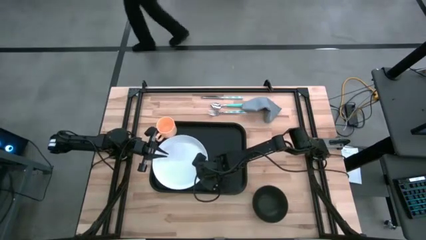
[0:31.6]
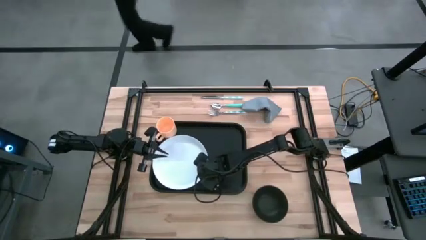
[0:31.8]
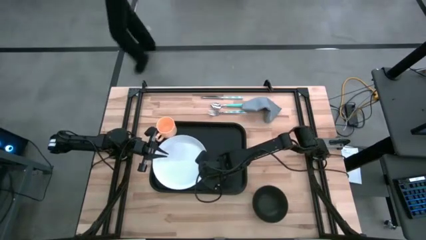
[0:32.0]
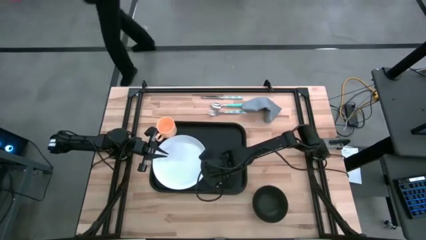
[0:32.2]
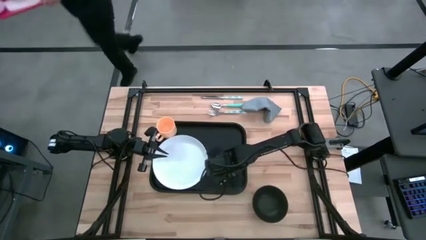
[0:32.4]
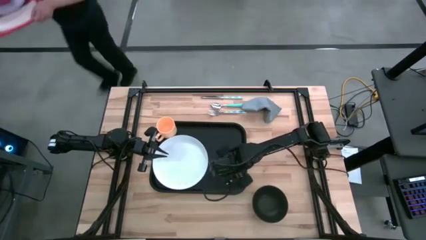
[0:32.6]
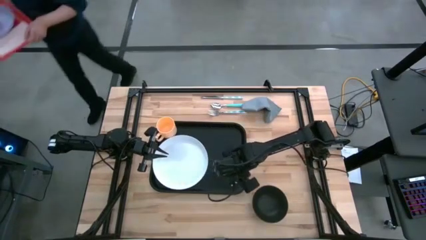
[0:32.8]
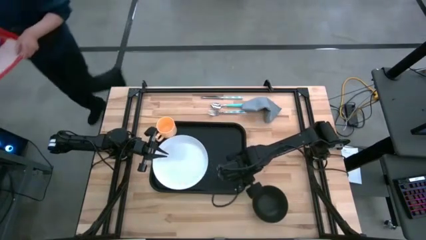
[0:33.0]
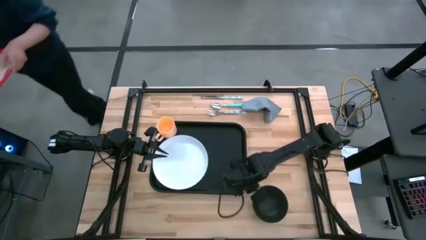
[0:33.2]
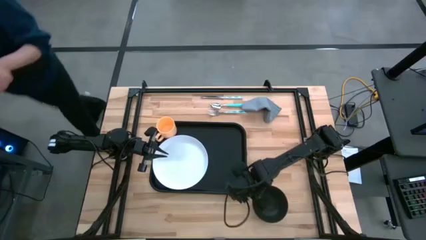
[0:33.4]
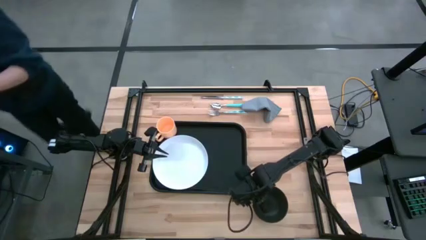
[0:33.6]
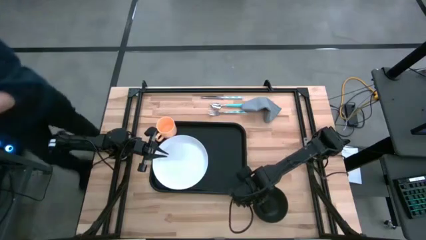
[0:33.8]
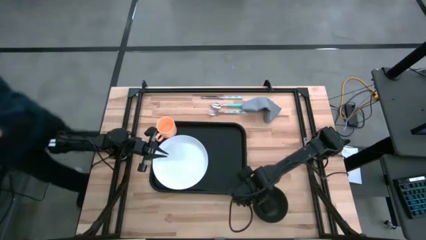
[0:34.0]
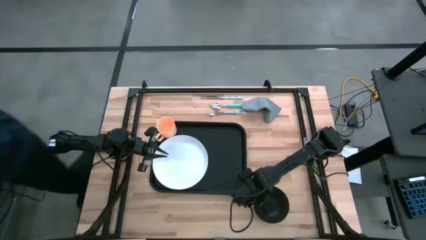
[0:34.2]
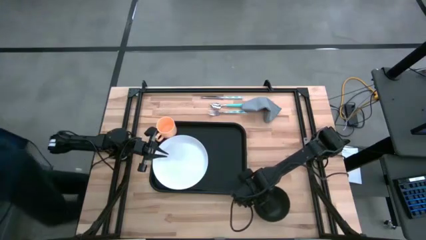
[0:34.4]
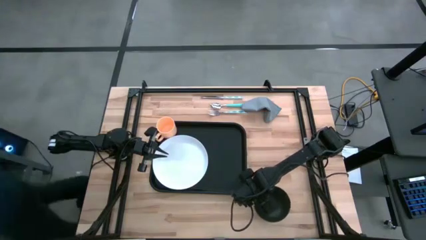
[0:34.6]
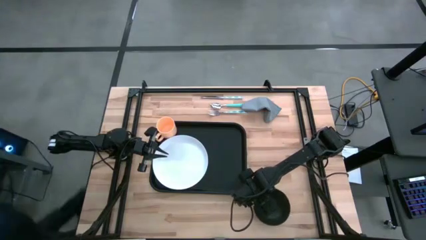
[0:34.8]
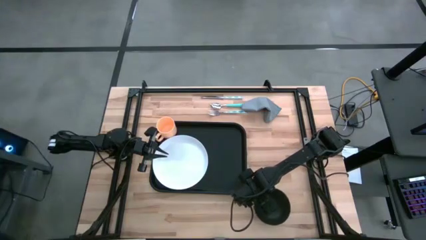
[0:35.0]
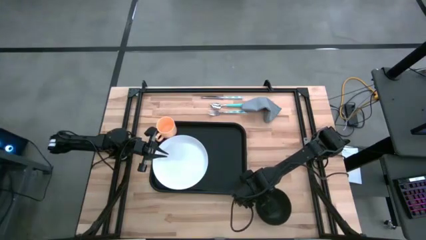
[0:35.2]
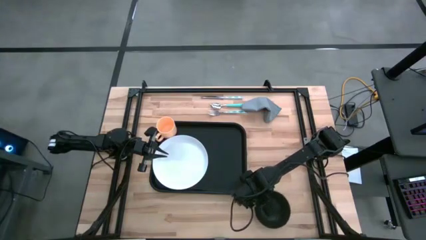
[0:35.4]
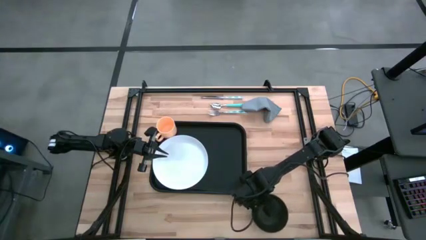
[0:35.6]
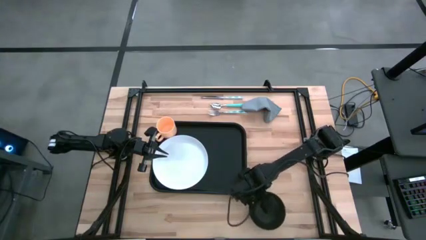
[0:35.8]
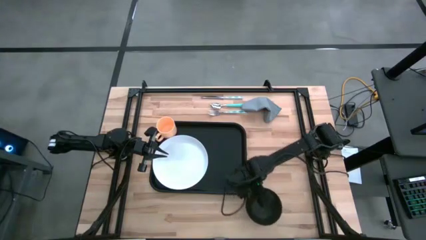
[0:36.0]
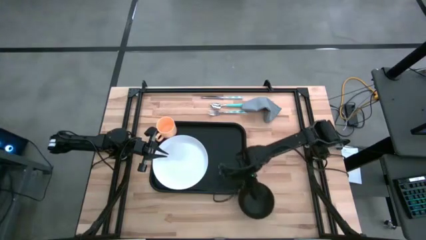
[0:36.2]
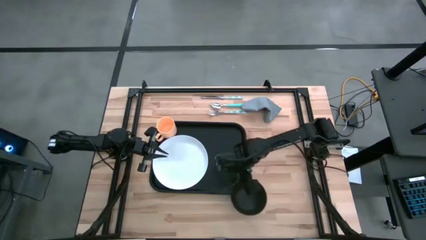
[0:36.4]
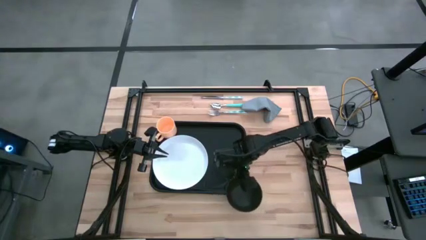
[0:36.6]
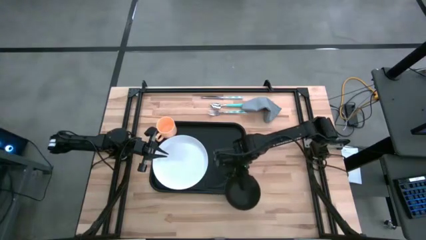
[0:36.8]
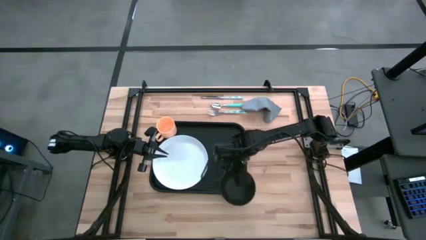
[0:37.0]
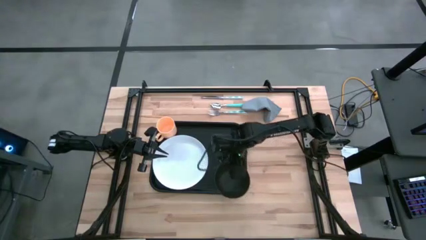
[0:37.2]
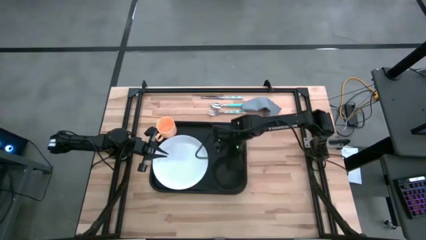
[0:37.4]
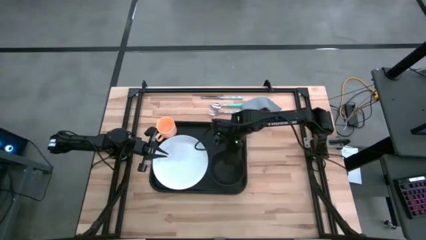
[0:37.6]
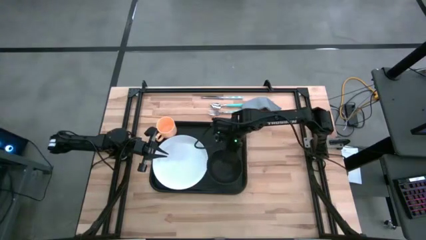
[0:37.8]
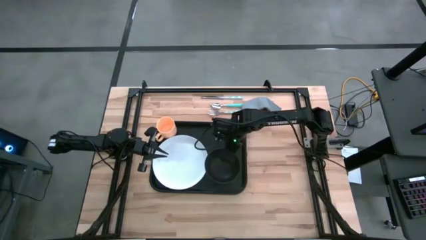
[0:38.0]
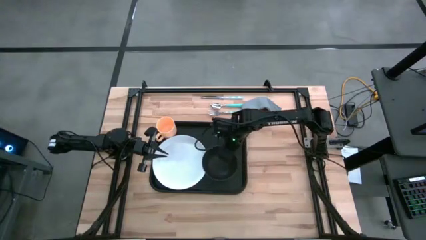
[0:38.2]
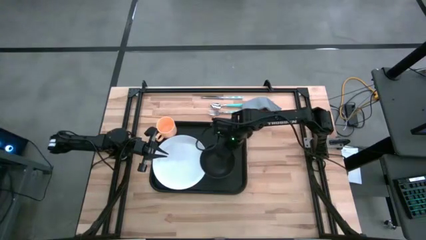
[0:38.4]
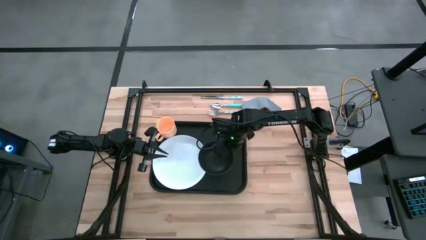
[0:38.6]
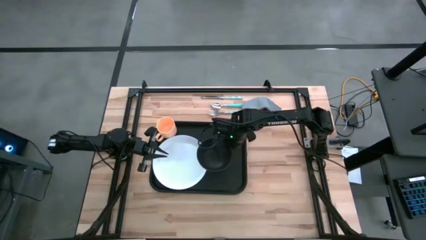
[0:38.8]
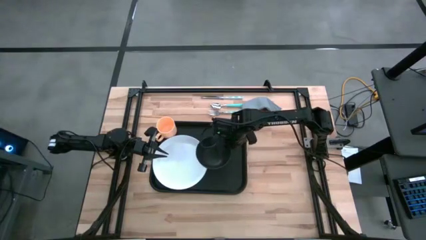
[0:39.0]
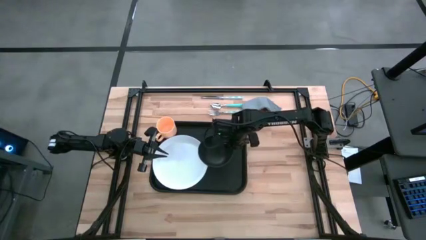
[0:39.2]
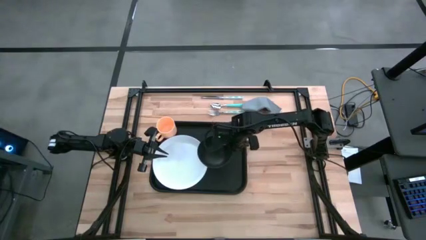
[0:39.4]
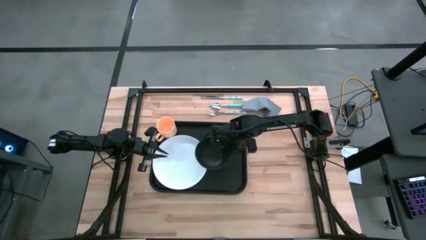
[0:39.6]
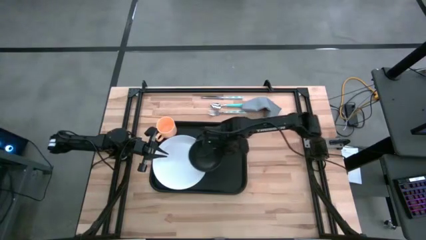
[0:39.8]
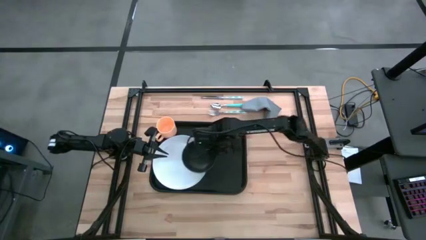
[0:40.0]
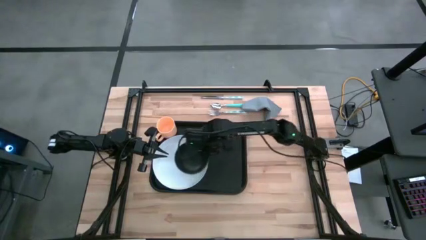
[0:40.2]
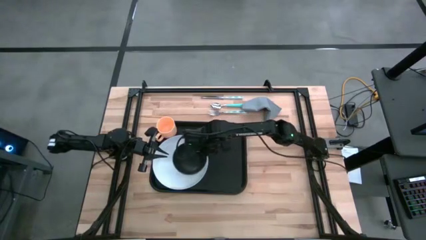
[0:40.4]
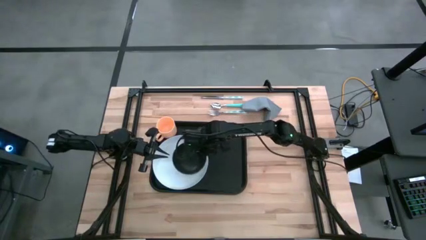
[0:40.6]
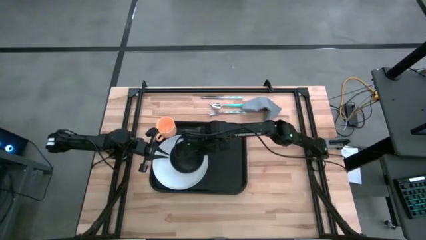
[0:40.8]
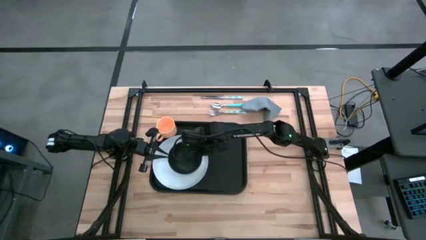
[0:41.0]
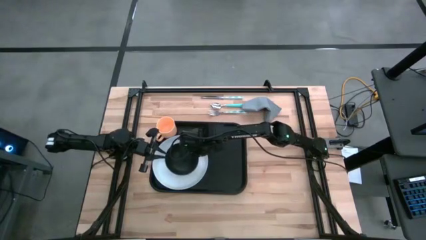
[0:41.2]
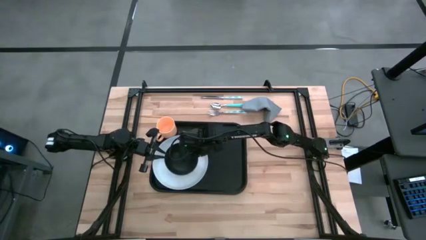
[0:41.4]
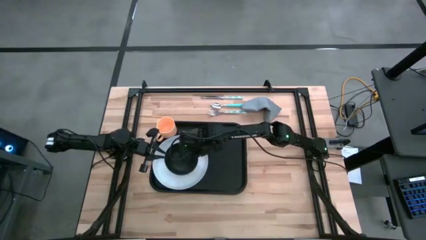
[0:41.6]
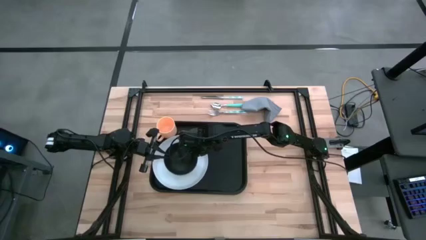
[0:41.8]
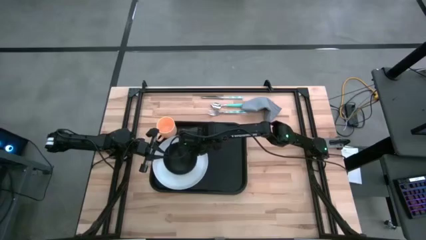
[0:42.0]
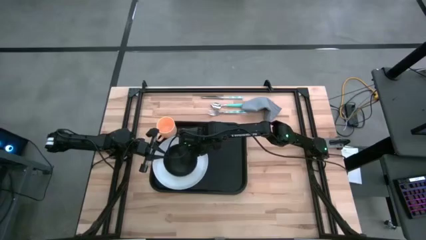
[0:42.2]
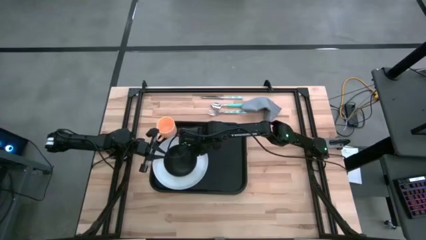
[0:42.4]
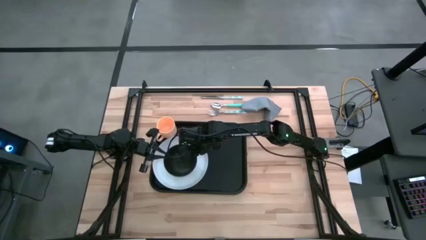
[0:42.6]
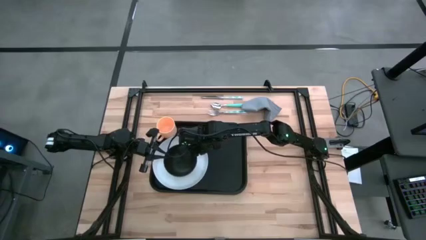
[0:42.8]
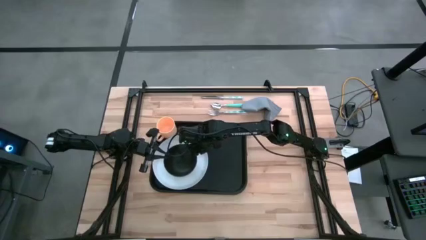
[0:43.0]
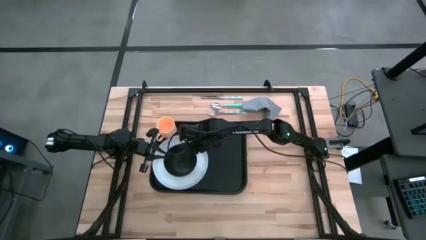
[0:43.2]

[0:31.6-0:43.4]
Task: Set up tray
Put the black bowl on the white plate on the black tray
